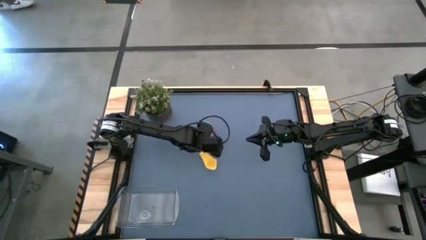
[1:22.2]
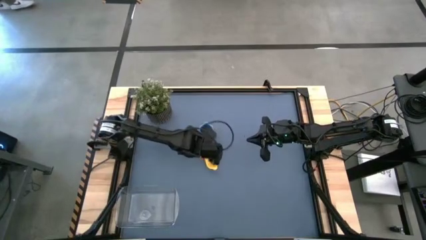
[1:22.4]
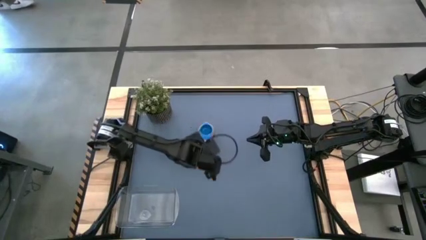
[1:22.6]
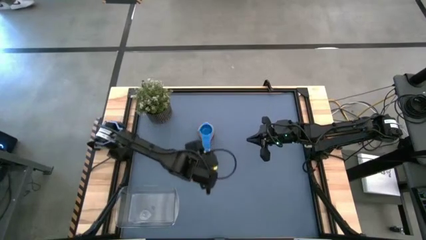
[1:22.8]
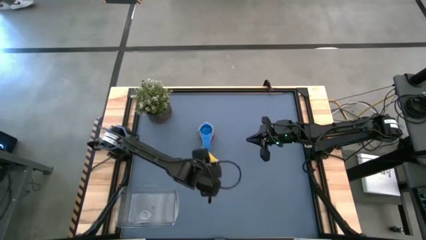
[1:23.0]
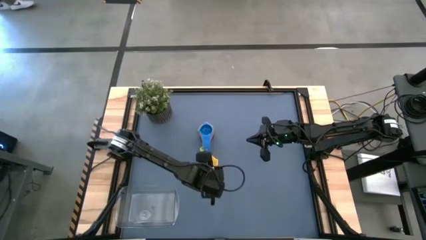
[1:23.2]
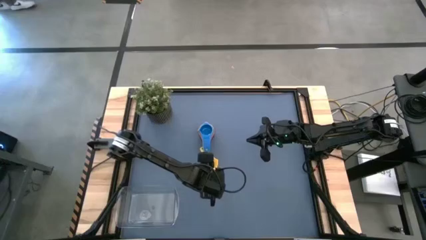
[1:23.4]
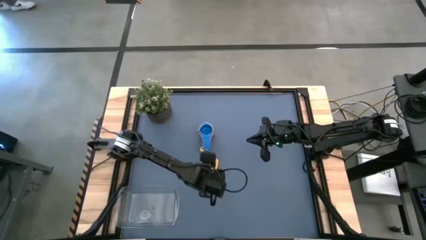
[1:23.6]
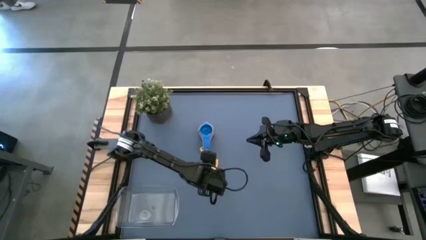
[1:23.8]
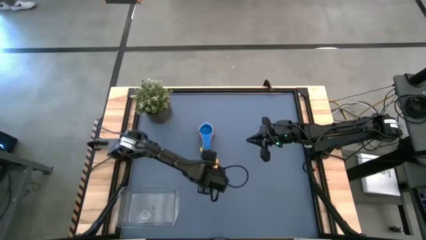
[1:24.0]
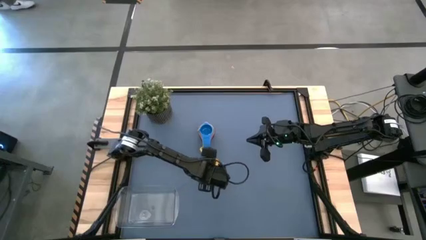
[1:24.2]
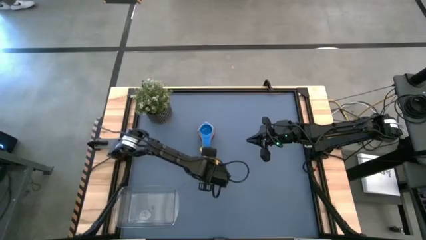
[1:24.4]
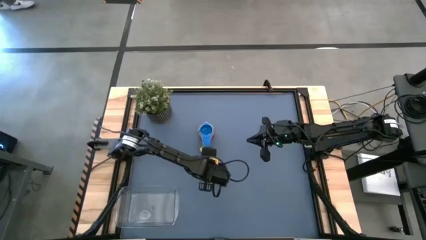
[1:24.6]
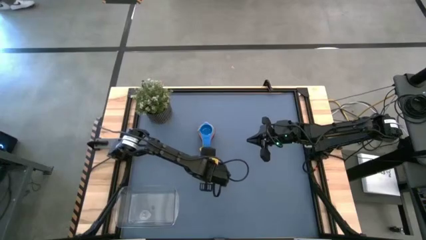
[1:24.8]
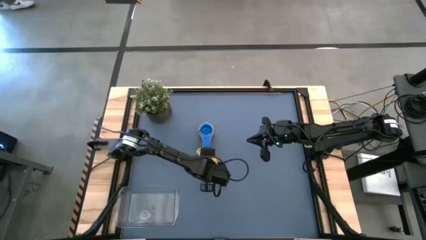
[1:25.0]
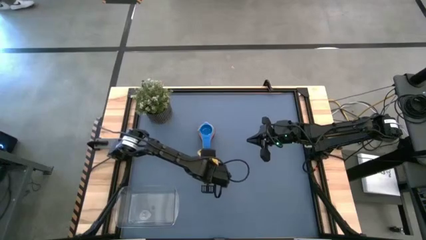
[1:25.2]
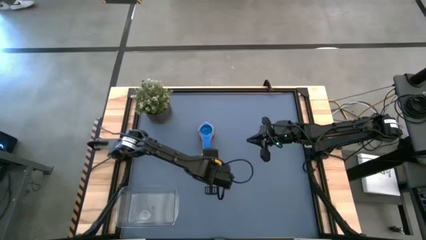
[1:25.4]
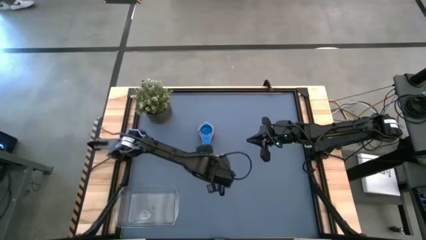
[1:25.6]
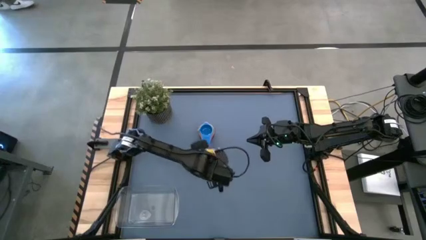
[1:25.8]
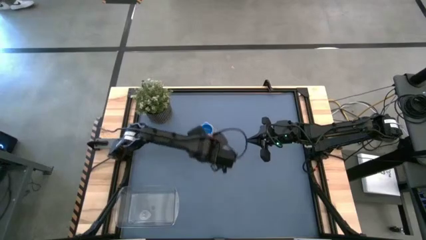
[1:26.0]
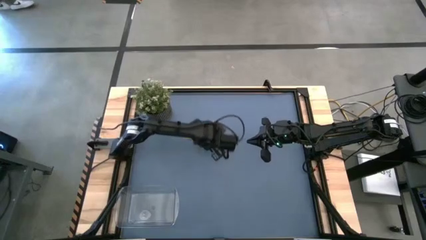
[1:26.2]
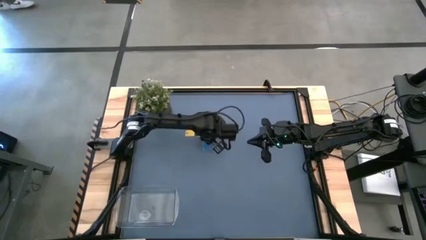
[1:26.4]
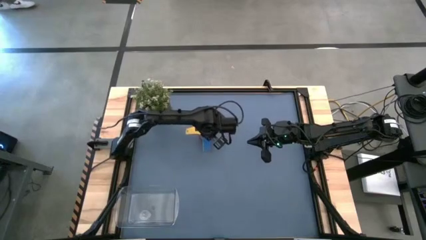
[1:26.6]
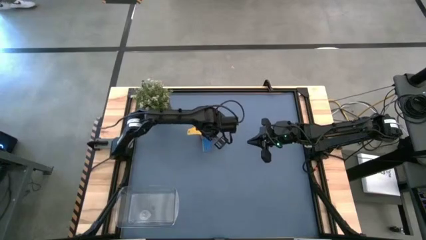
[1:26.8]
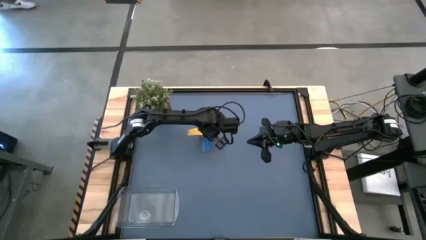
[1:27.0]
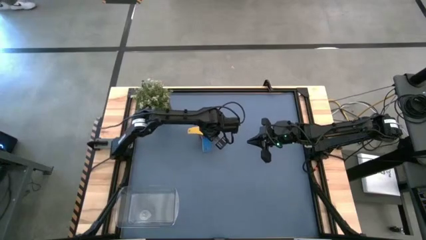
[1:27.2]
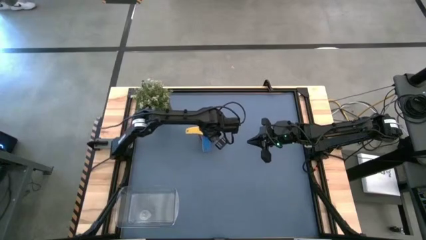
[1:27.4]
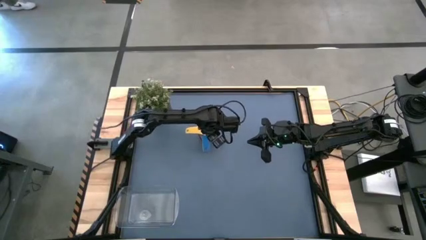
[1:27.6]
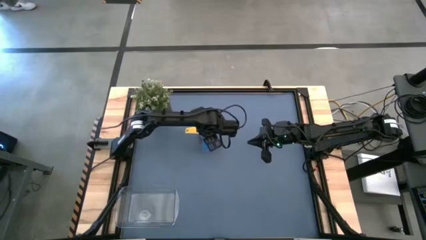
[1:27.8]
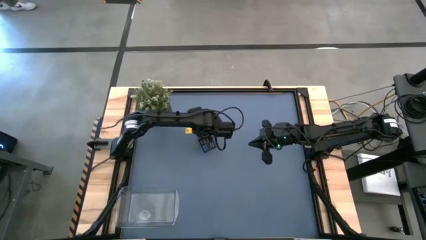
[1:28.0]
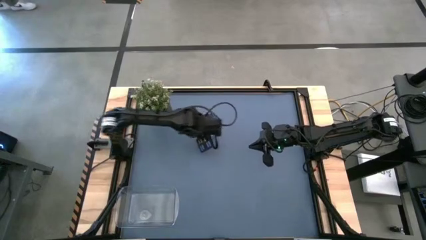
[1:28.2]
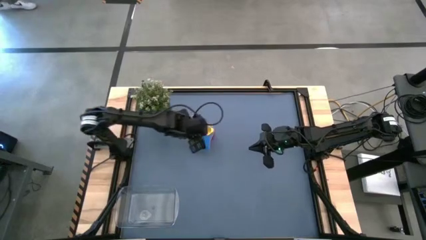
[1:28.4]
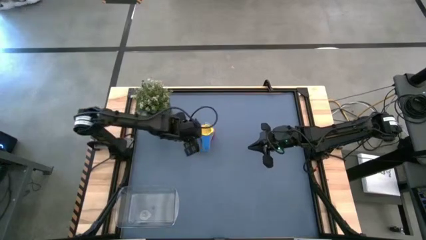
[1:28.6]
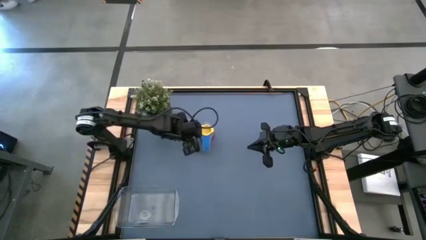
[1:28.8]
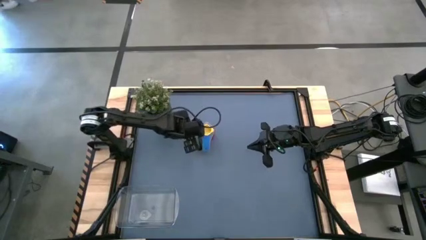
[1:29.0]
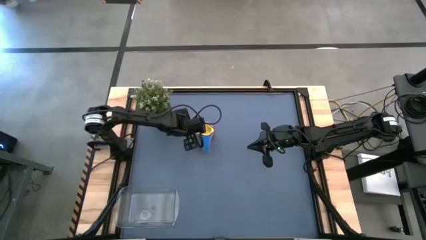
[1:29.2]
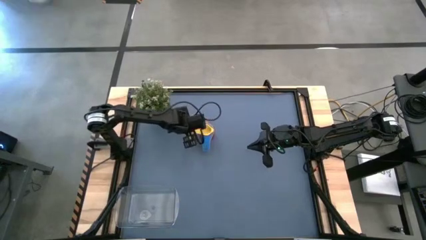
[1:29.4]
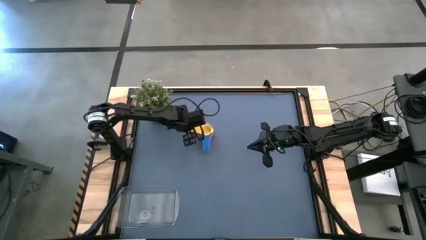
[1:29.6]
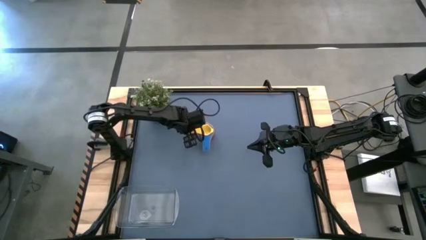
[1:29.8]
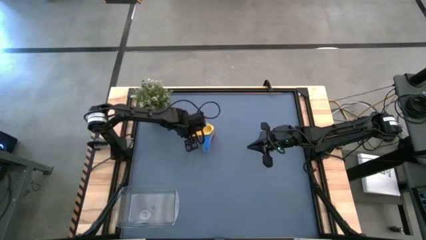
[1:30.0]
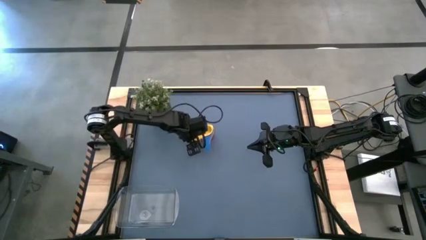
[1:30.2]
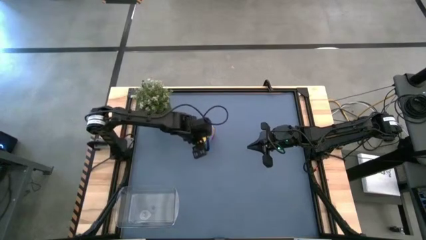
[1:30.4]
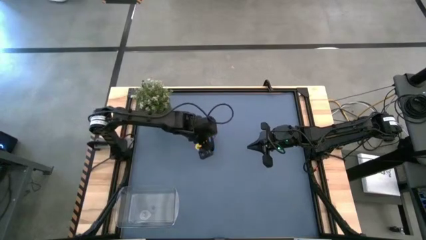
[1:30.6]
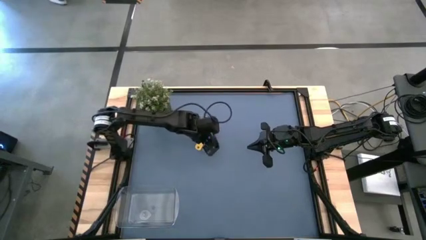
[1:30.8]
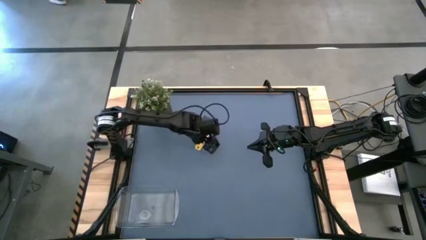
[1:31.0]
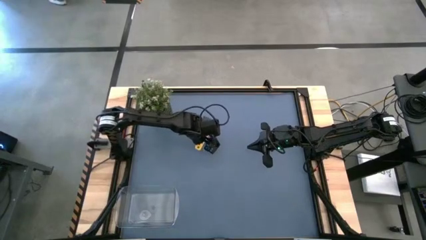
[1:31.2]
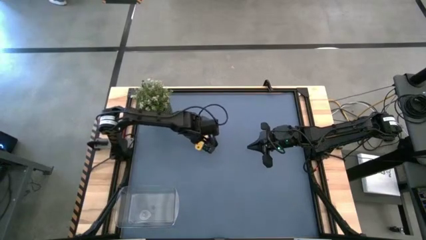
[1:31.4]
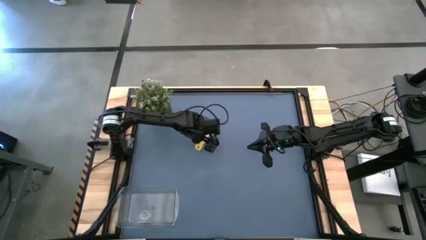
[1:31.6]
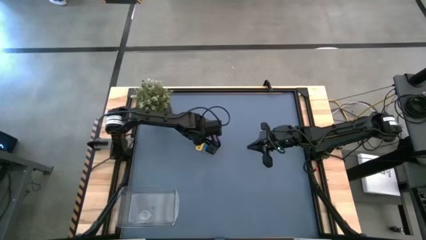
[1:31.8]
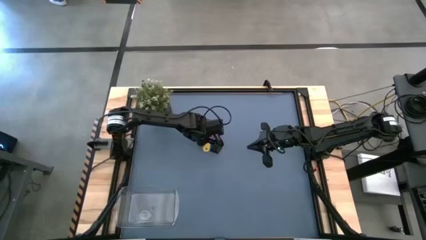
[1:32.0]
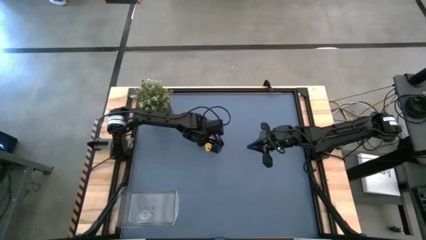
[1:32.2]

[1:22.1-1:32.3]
Task: Nest measuring cups in basket
Stack the yellow measuring cup on top of the blue measuring cup
